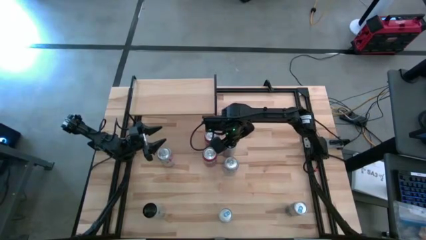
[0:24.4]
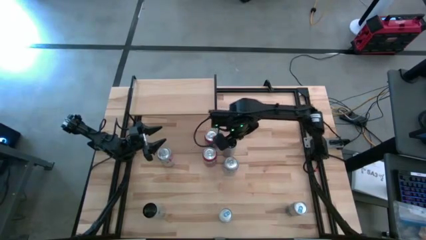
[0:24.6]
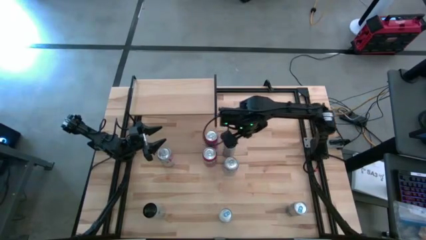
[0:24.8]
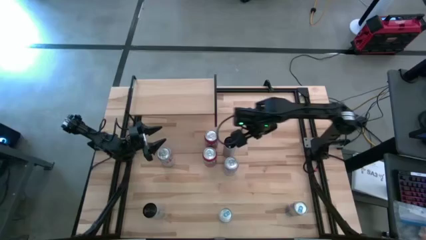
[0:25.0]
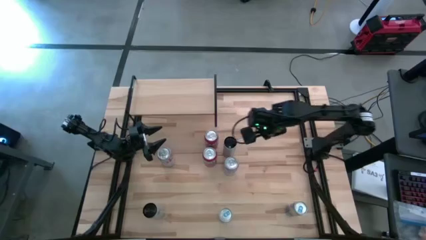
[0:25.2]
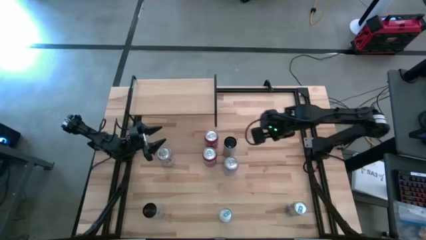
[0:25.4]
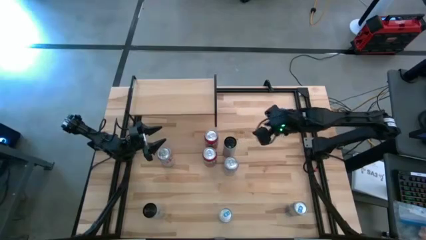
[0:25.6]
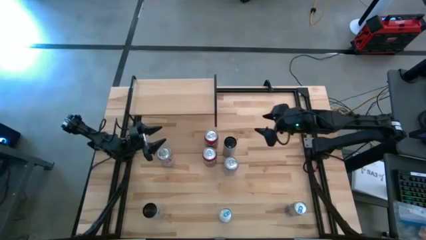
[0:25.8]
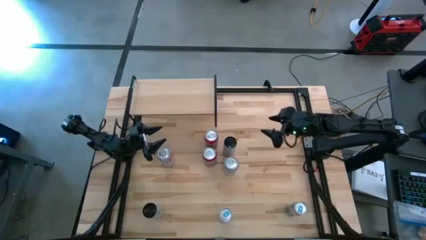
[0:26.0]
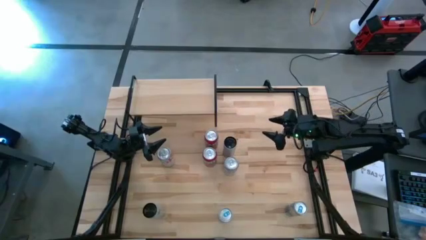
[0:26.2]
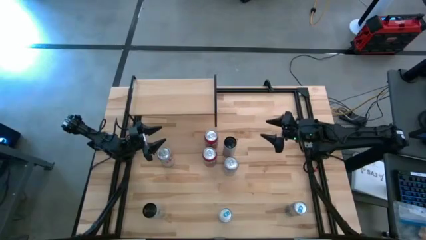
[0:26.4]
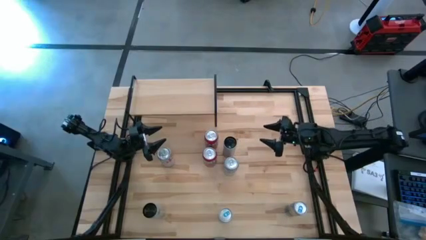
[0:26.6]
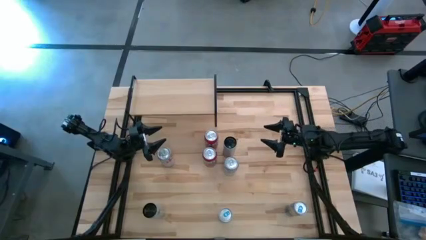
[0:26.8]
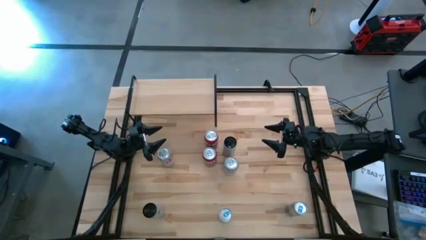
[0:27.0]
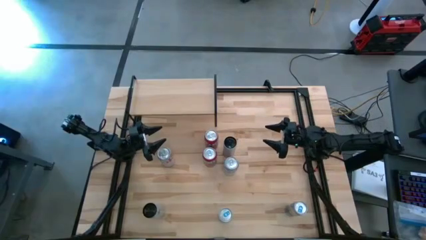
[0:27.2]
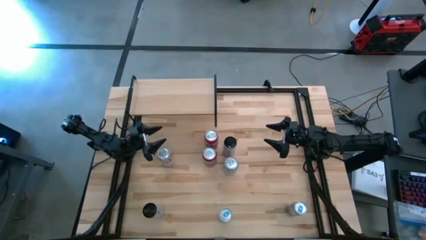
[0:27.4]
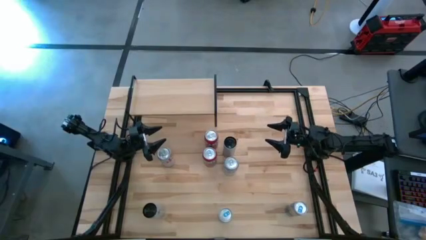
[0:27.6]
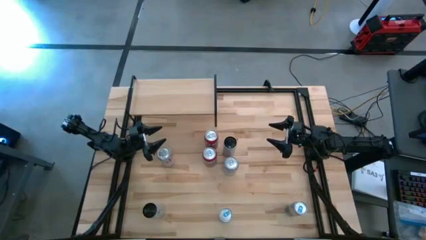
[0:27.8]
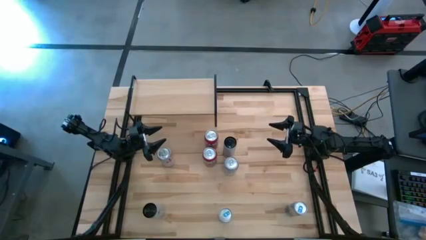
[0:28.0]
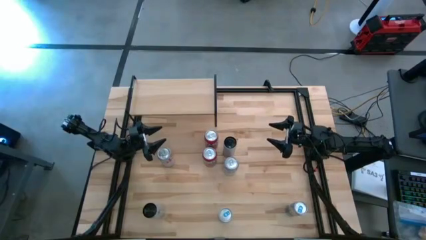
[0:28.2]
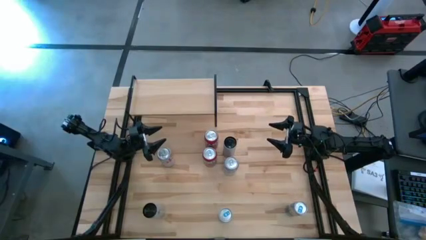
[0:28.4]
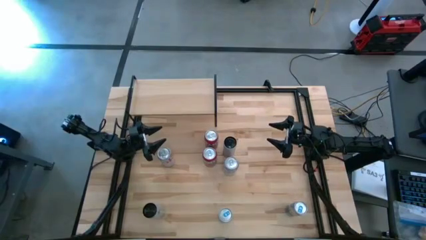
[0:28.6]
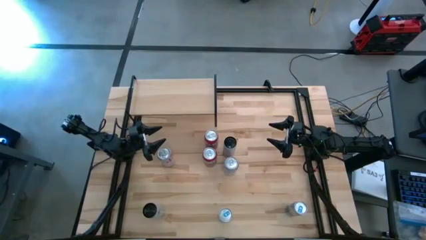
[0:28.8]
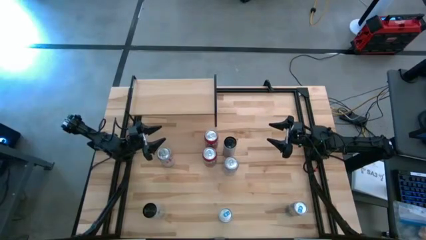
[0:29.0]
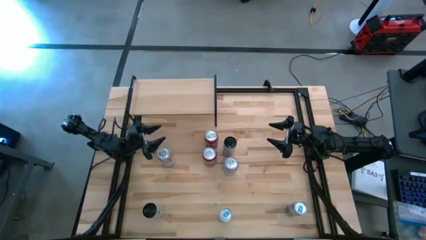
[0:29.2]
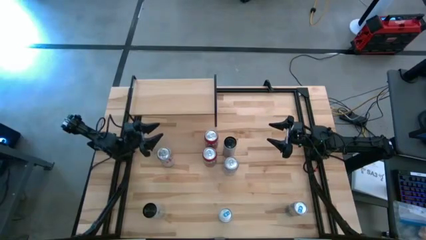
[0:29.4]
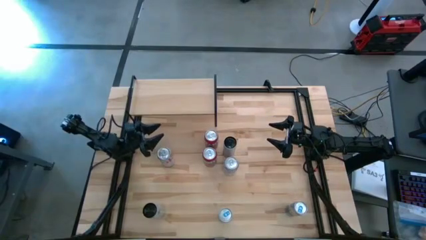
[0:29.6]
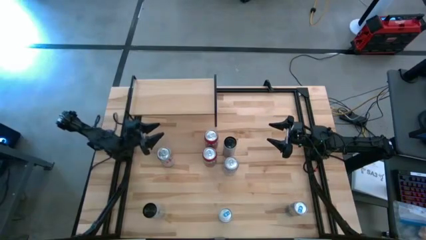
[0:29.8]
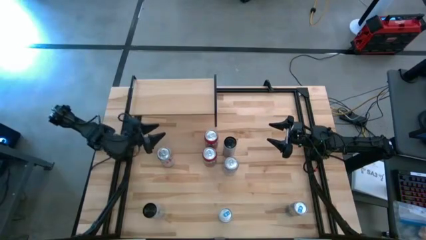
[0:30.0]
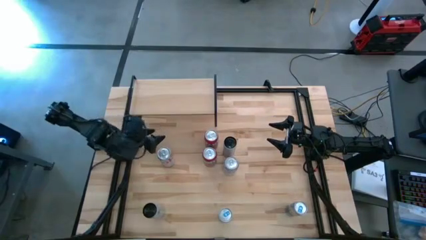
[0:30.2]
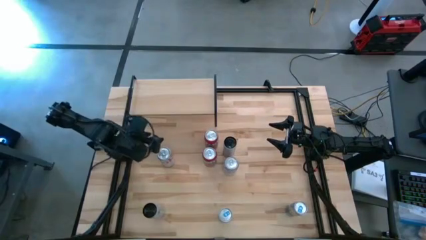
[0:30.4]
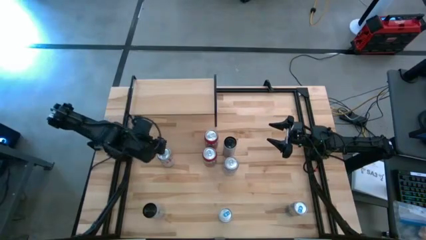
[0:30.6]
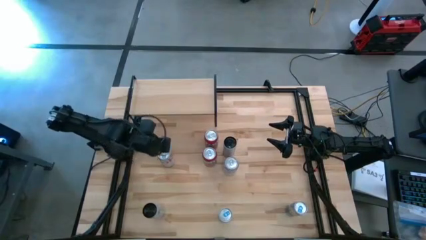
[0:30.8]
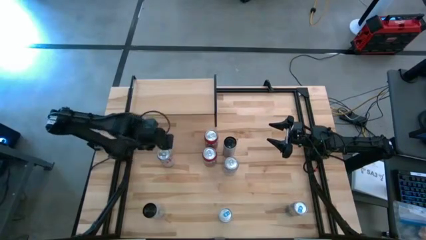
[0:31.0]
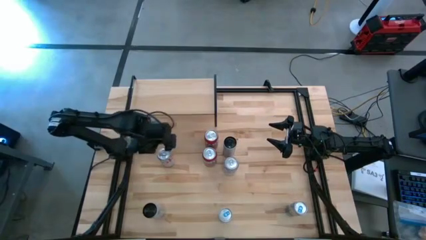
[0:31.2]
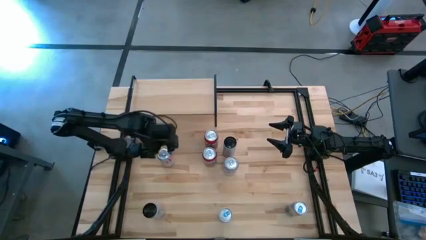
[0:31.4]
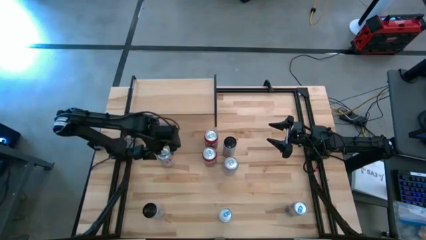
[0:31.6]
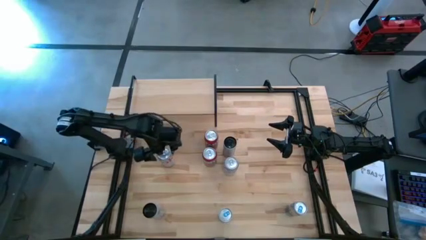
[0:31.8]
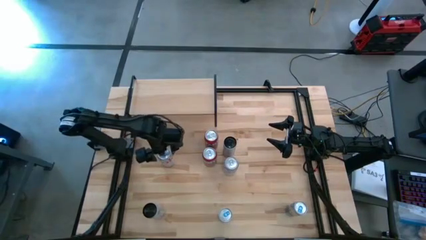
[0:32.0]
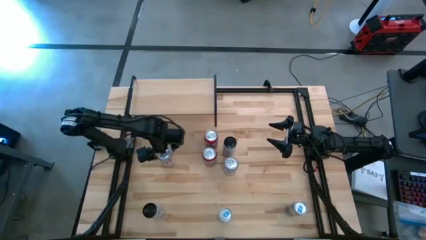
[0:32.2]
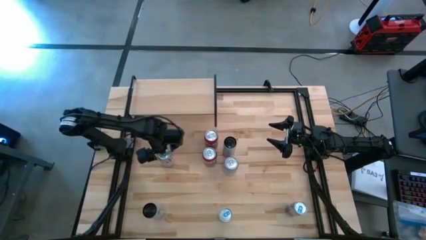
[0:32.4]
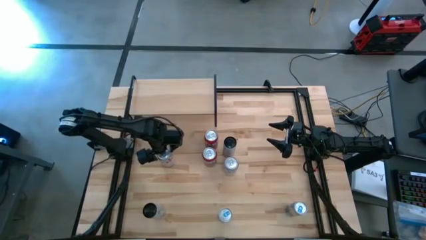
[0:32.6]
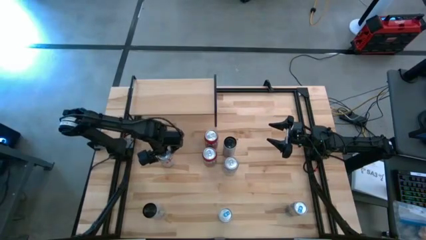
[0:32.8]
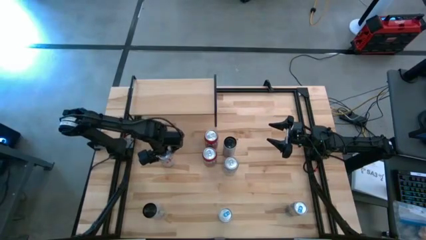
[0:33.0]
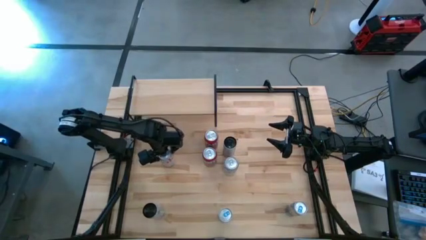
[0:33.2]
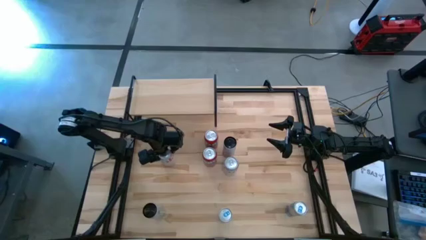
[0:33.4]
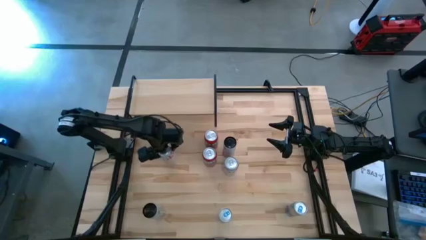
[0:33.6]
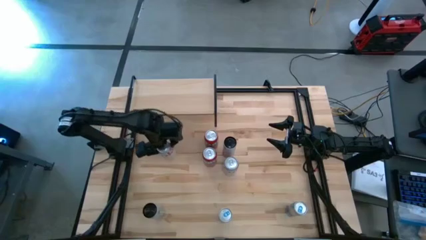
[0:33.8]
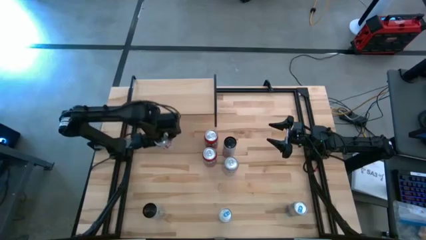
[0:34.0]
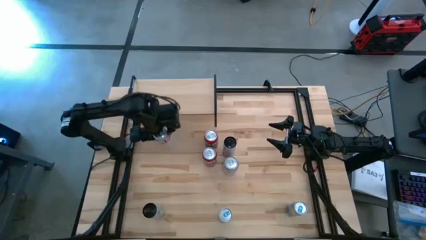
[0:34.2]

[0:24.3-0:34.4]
Task: Place canned beverage on shelf
Put the left red-silver soda can on the shelf
